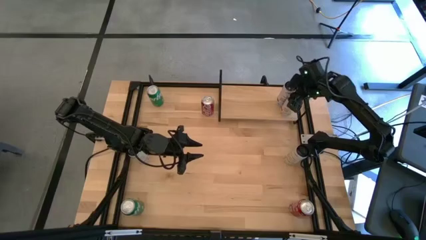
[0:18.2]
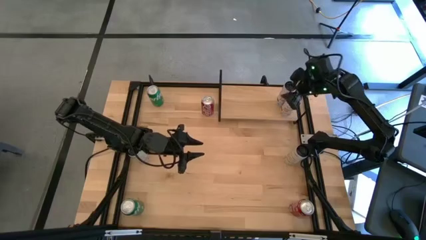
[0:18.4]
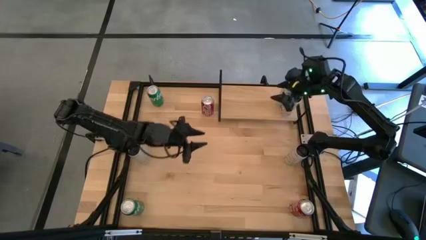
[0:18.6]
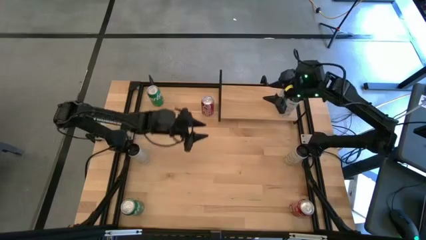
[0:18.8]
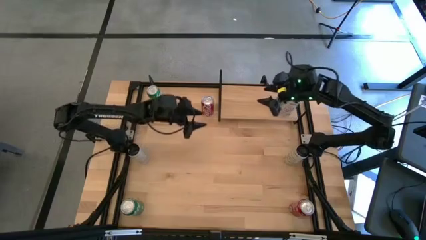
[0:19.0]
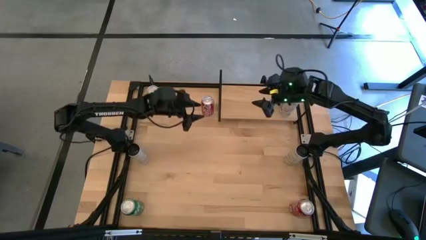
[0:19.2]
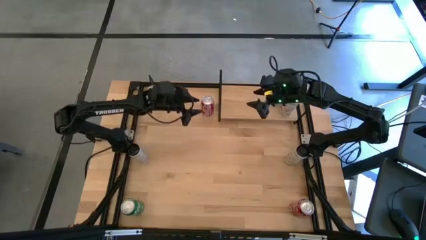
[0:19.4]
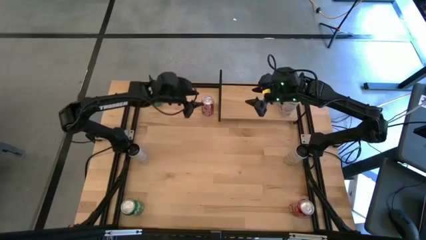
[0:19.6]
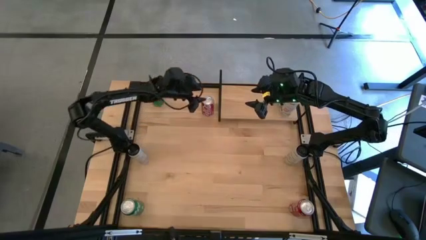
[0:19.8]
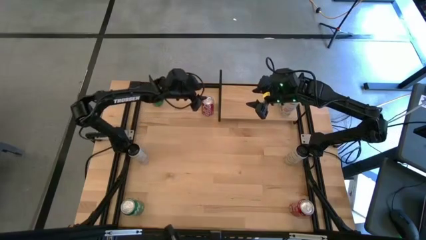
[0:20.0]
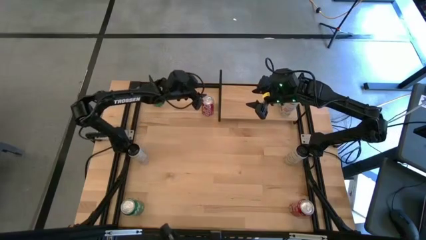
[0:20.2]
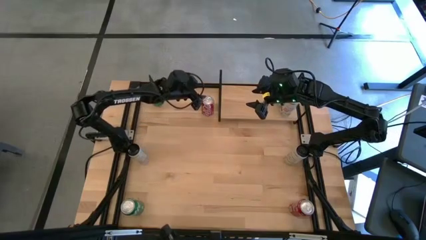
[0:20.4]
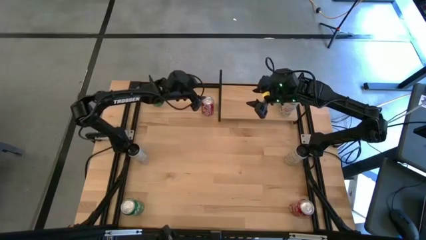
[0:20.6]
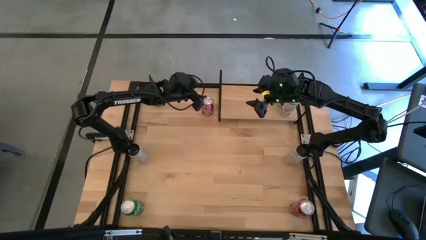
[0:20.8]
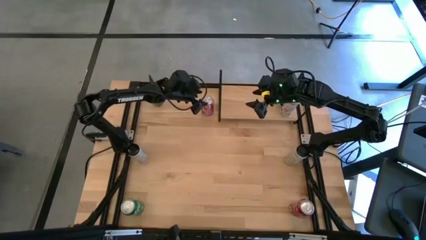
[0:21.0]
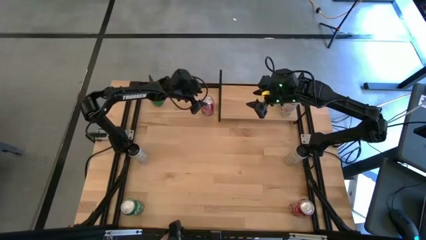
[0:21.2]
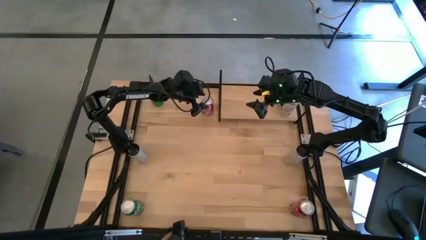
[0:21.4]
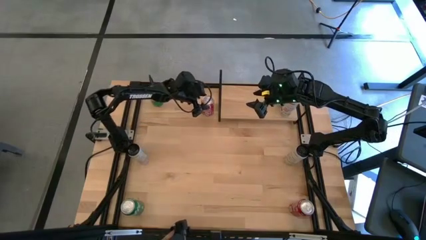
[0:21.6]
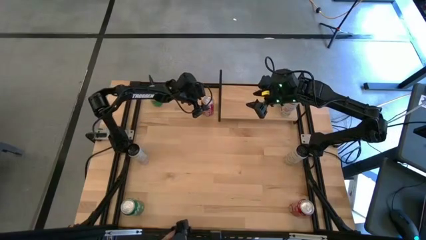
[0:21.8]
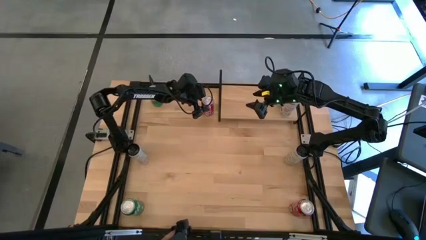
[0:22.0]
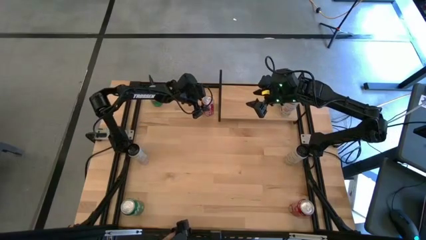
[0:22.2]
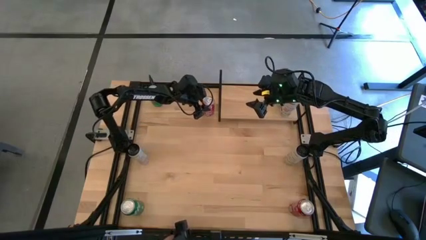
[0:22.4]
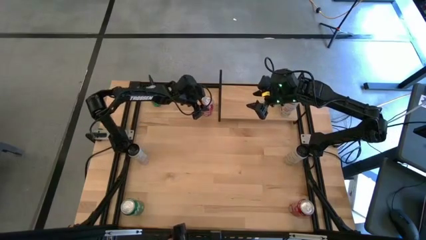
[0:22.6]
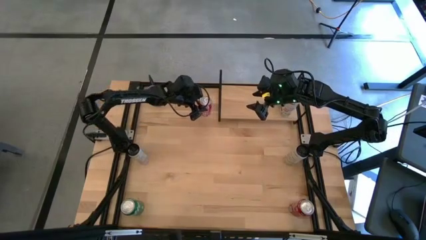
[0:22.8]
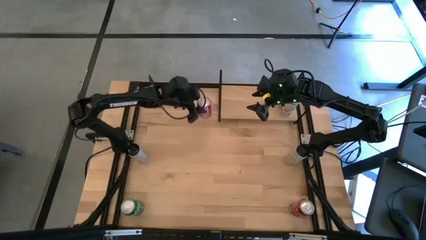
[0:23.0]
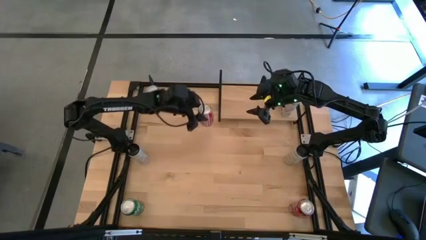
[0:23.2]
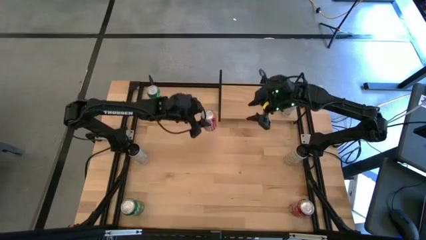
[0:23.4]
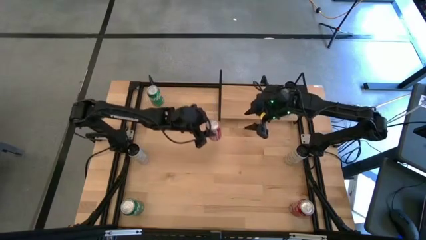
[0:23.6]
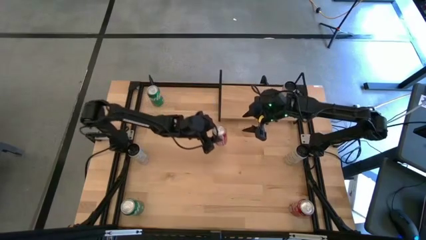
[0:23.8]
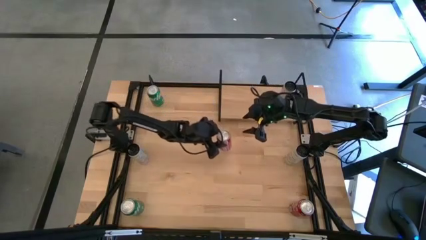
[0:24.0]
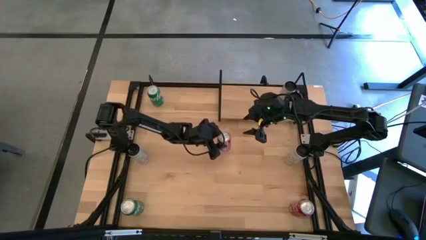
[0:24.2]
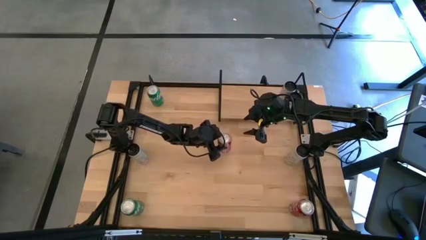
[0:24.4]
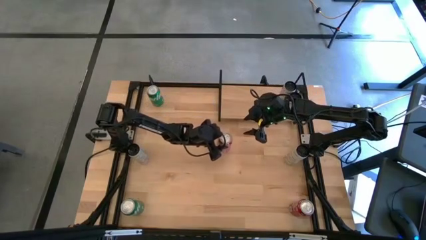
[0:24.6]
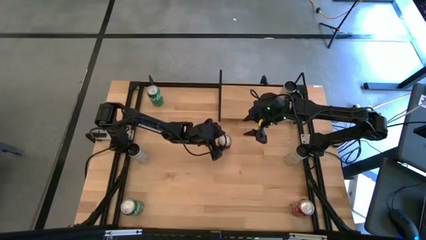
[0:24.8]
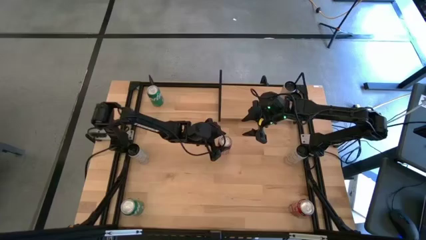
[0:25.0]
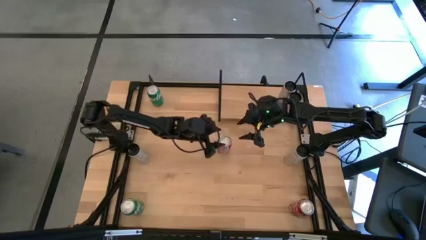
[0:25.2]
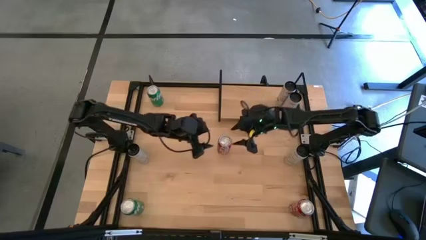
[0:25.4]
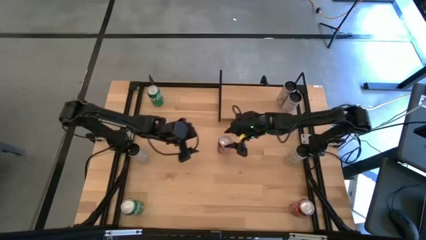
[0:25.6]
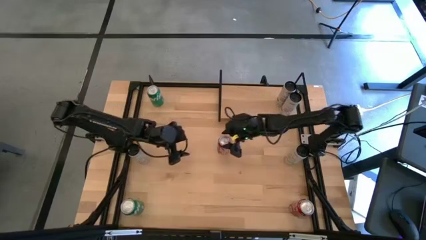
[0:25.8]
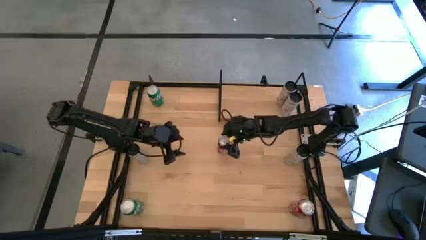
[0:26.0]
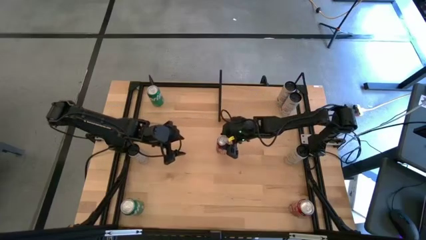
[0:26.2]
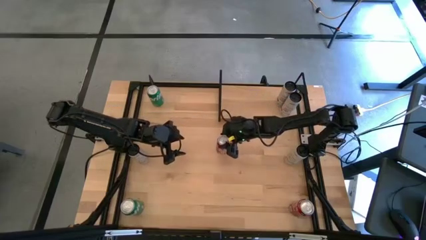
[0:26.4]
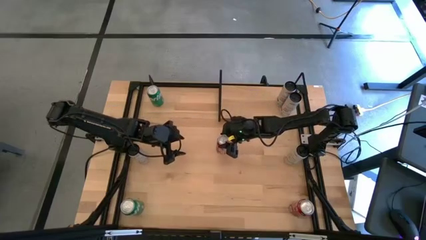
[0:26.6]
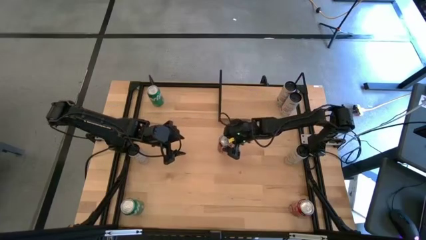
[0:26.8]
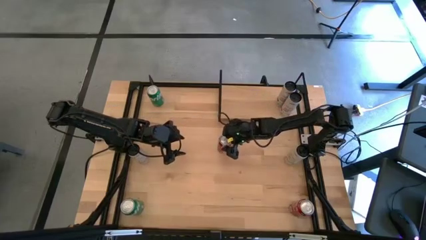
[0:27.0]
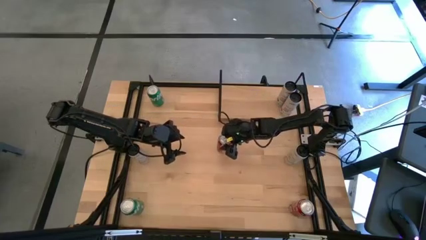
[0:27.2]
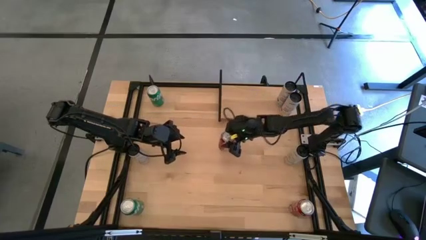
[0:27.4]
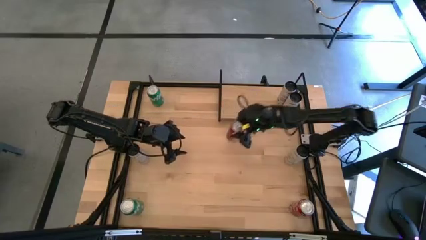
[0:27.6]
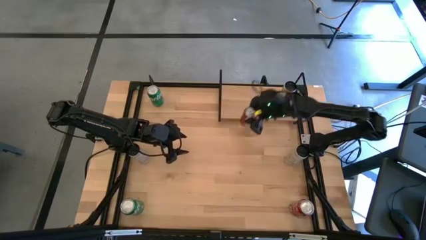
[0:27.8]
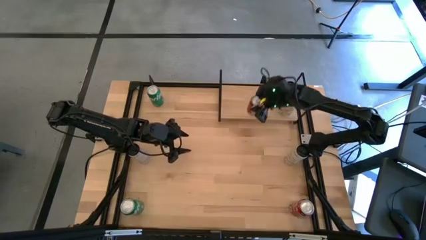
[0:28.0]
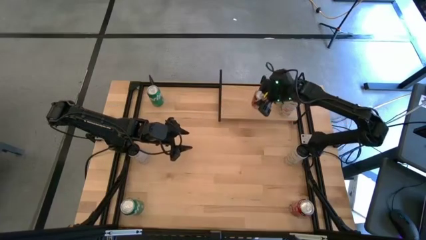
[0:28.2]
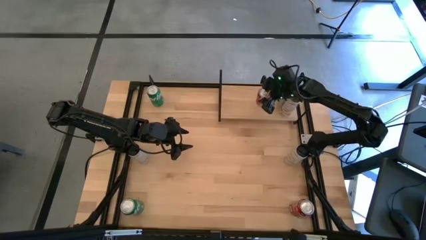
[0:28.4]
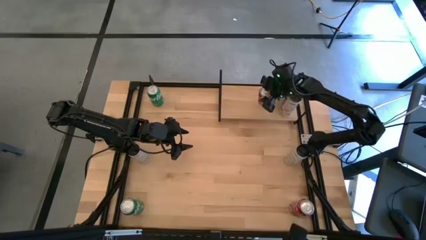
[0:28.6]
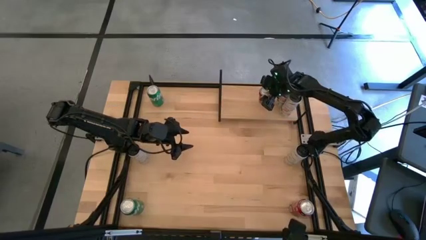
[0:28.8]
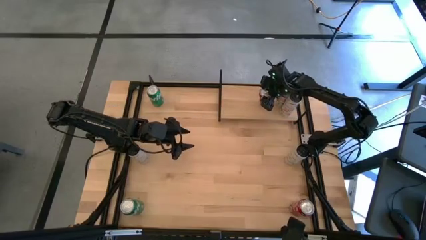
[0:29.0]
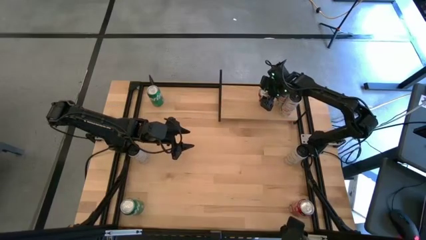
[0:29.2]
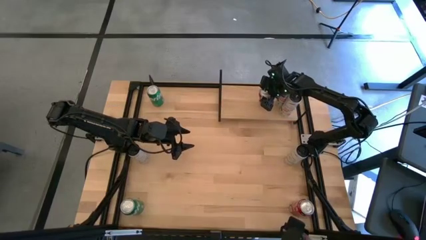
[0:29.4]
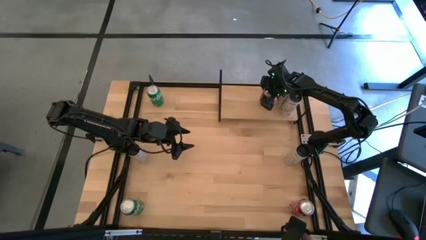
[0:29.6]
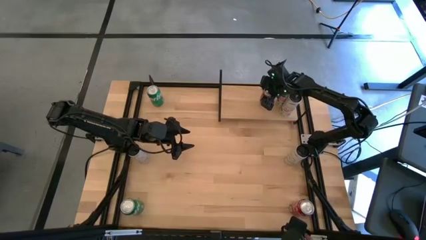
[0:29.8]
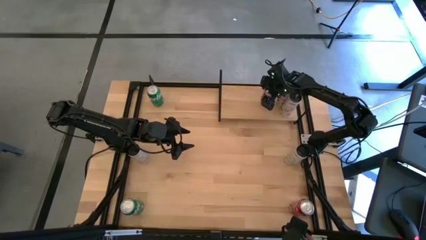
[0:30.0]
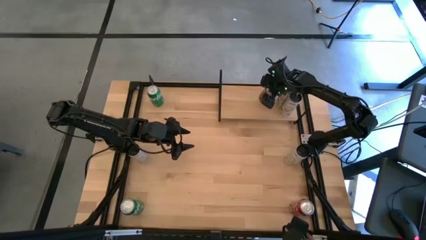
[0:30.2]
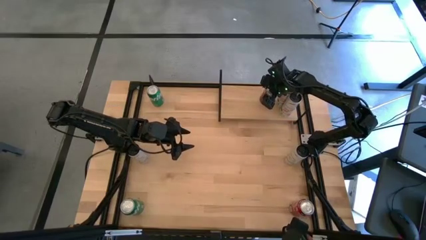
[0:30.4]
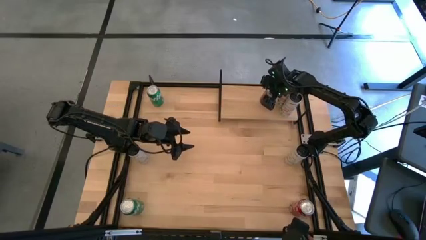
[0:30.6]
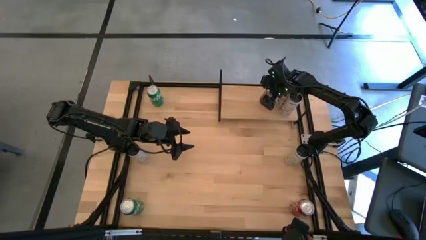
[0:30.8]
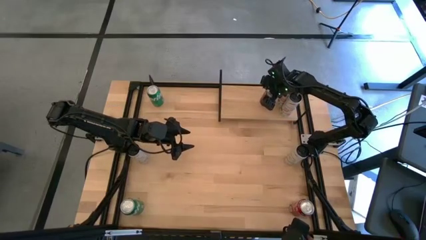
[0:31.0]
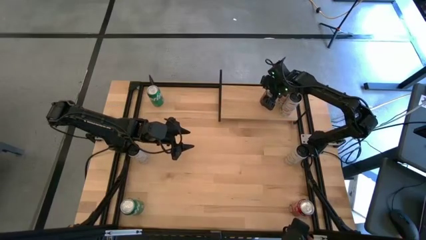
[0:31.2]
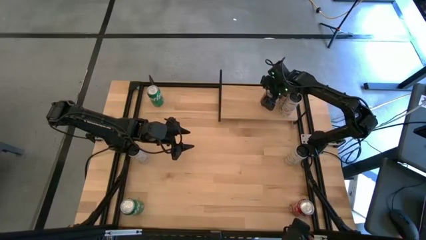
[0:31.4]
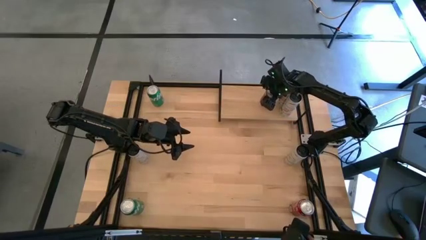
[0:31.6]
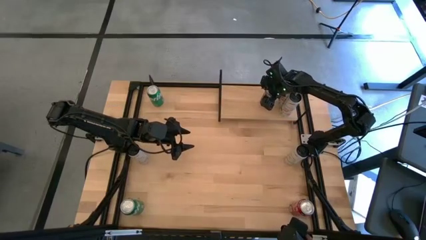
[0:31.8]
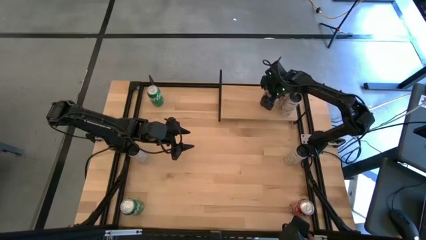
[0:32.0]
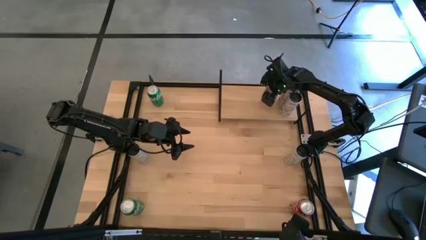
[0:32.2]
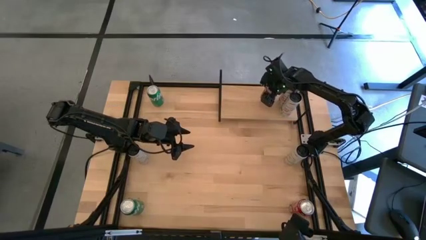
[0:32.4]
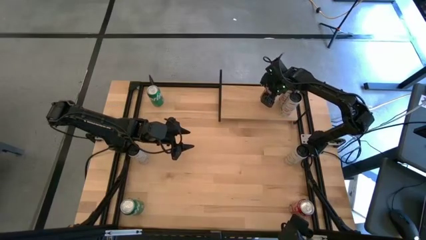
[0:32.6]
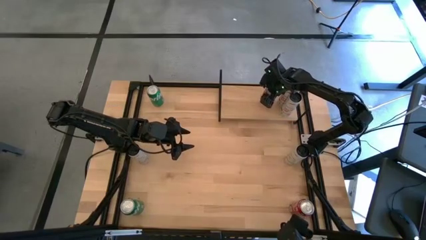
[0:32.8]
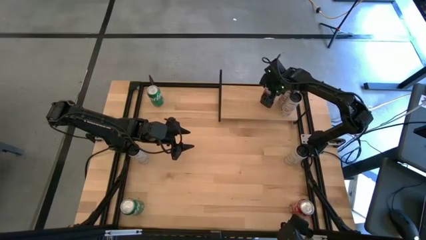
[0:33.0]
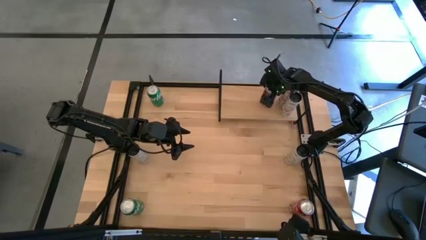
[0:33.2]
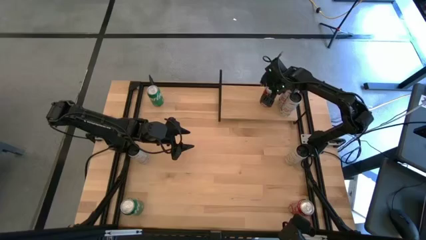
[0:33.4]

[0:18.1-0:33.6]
Task: Place canned beverage on shelf
Put the top red soda can on the shelf
